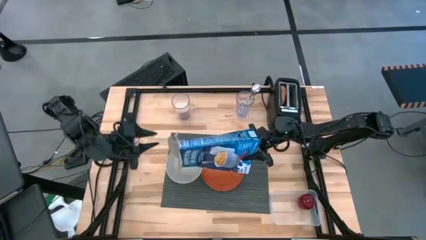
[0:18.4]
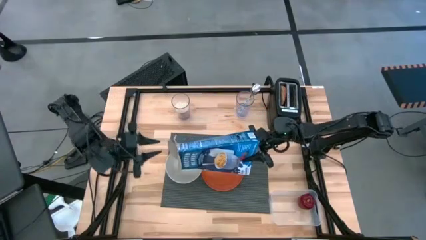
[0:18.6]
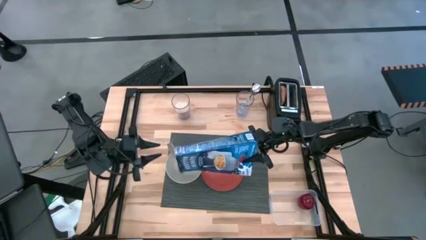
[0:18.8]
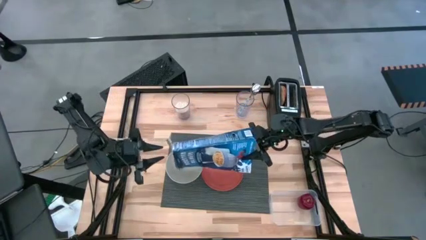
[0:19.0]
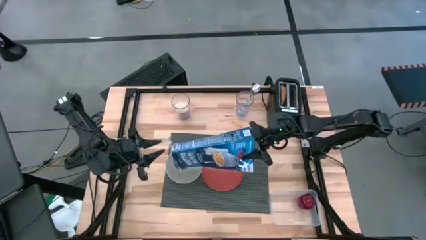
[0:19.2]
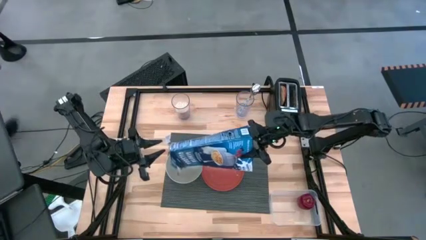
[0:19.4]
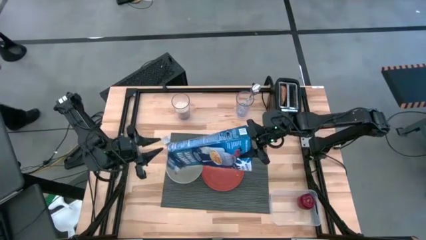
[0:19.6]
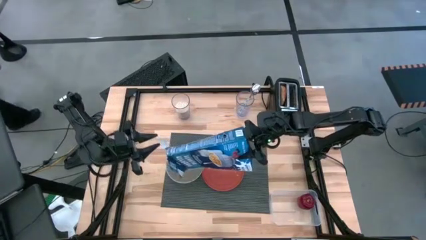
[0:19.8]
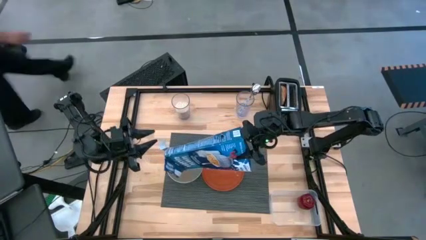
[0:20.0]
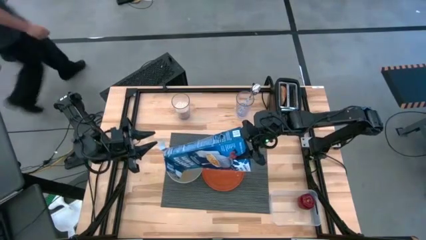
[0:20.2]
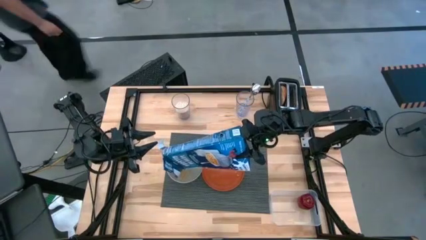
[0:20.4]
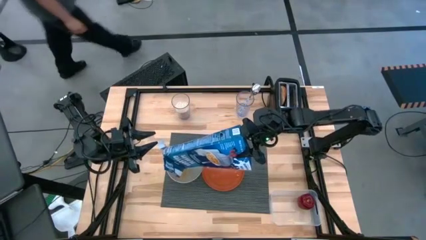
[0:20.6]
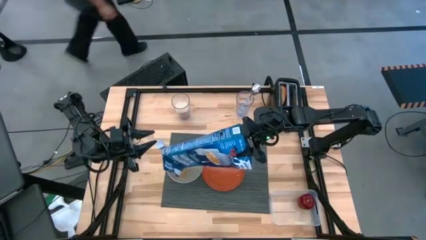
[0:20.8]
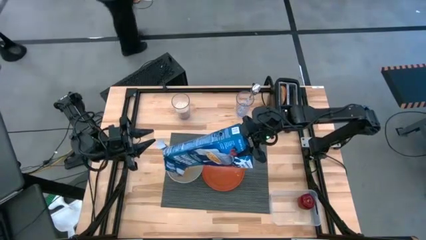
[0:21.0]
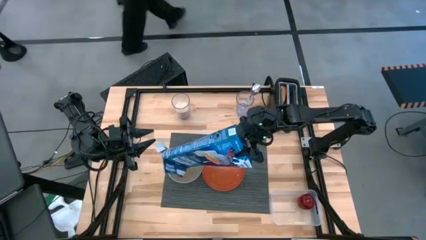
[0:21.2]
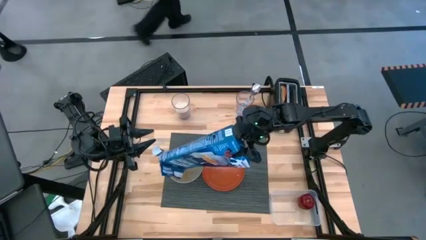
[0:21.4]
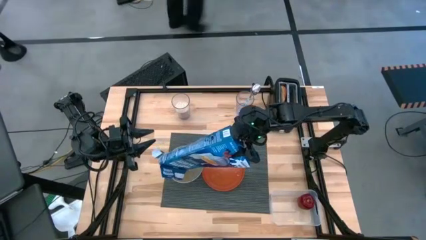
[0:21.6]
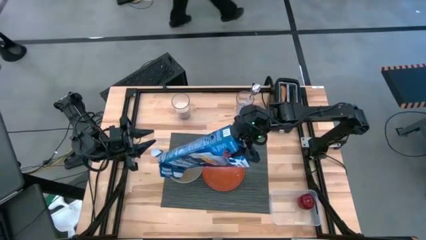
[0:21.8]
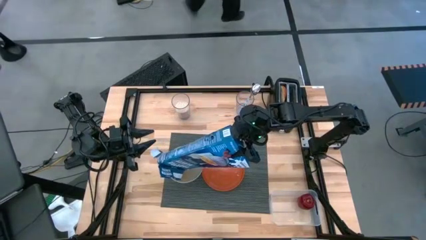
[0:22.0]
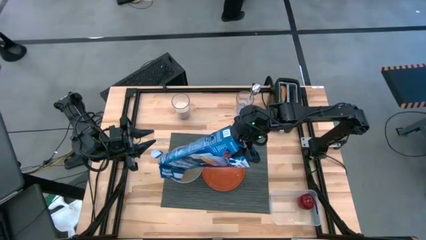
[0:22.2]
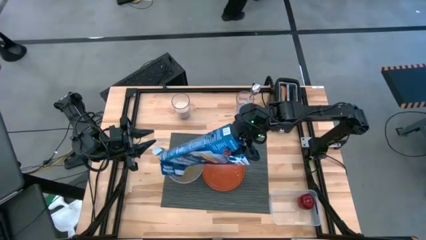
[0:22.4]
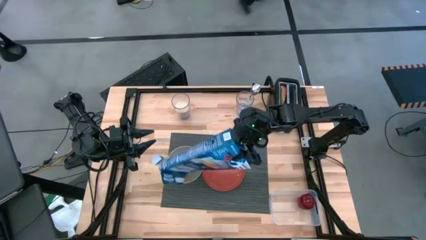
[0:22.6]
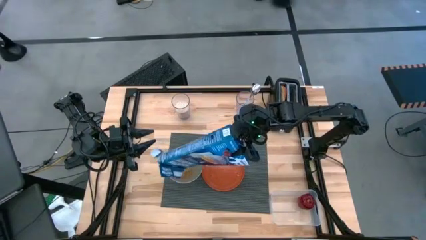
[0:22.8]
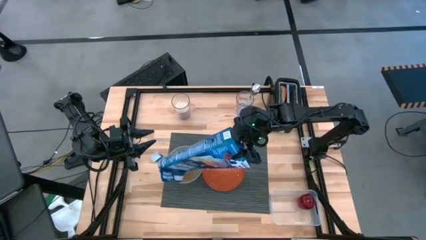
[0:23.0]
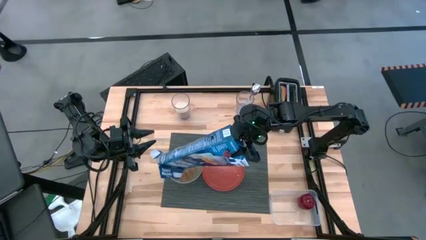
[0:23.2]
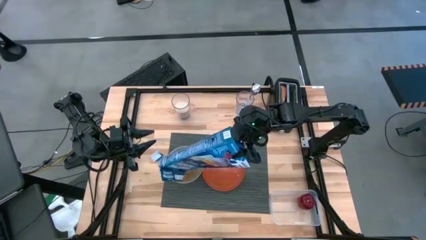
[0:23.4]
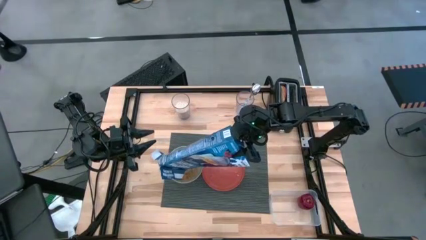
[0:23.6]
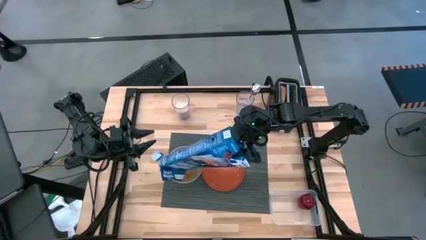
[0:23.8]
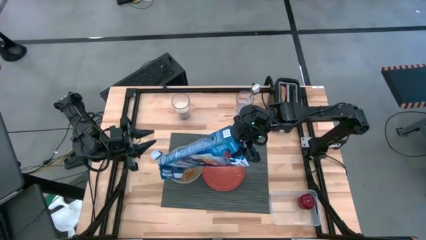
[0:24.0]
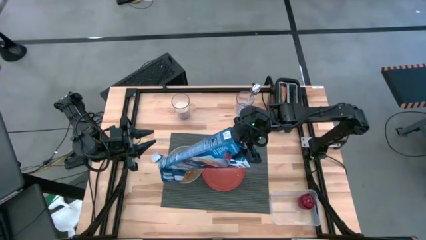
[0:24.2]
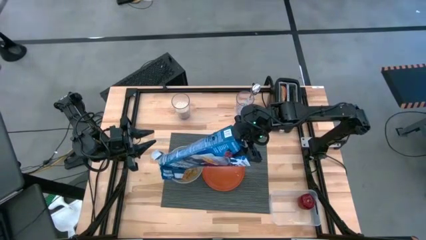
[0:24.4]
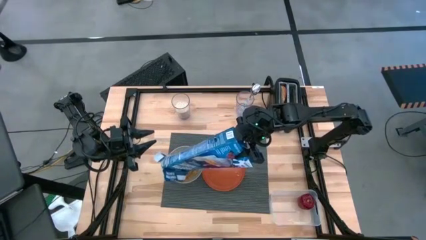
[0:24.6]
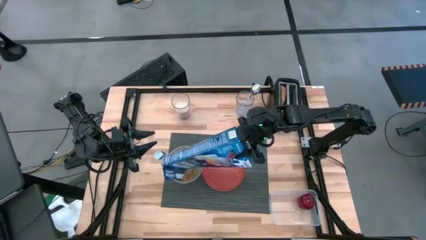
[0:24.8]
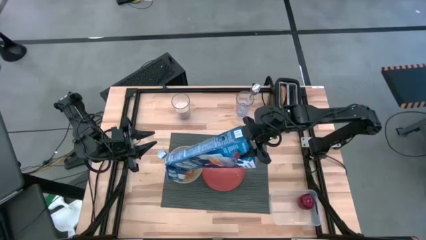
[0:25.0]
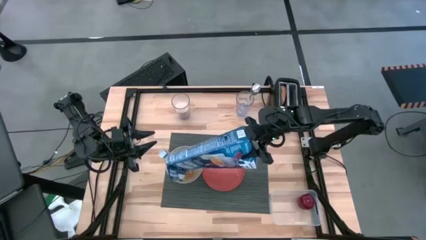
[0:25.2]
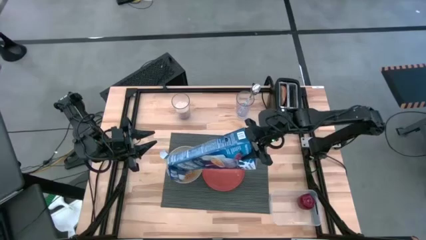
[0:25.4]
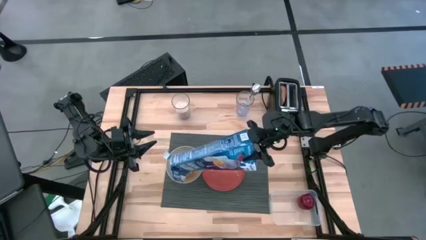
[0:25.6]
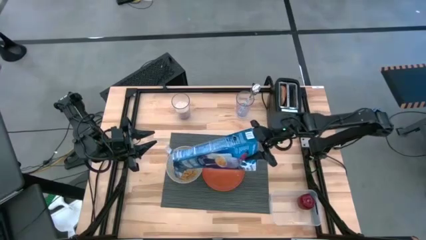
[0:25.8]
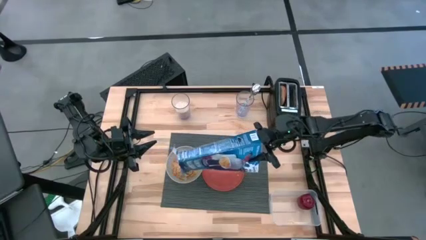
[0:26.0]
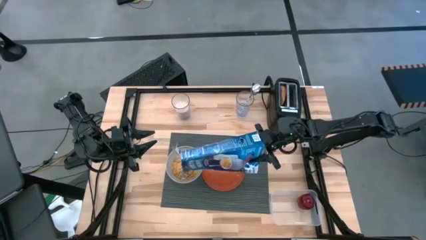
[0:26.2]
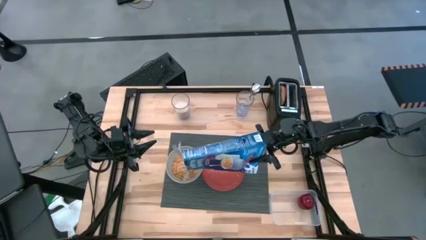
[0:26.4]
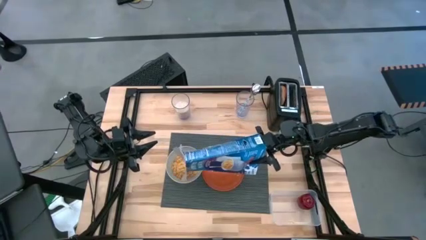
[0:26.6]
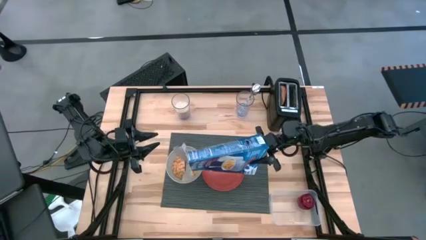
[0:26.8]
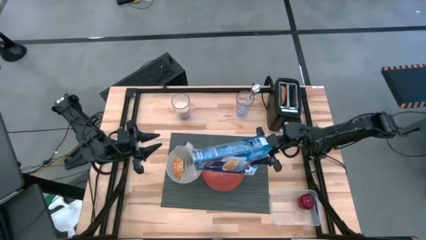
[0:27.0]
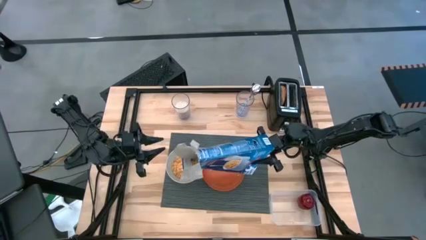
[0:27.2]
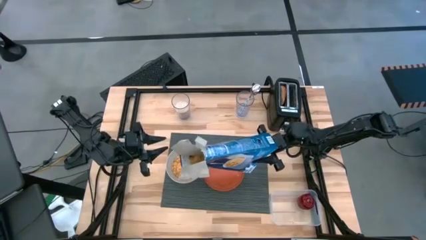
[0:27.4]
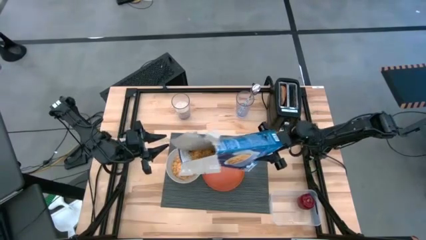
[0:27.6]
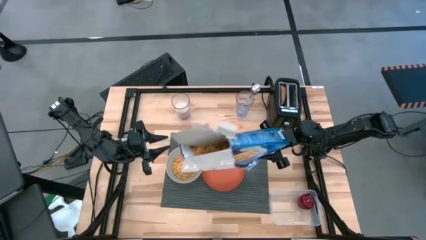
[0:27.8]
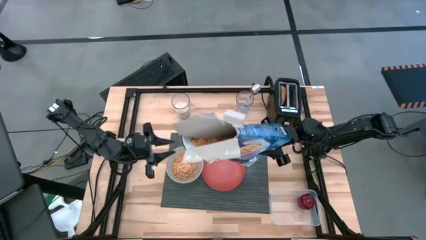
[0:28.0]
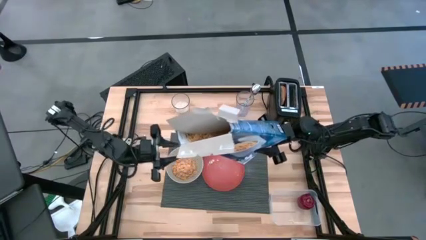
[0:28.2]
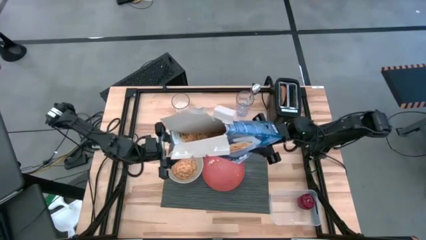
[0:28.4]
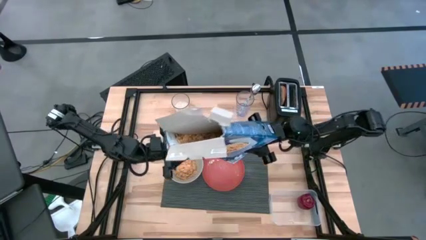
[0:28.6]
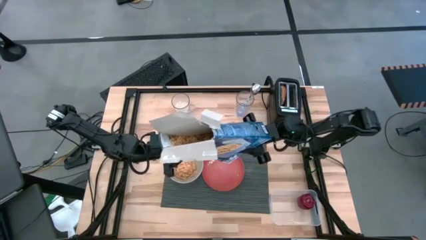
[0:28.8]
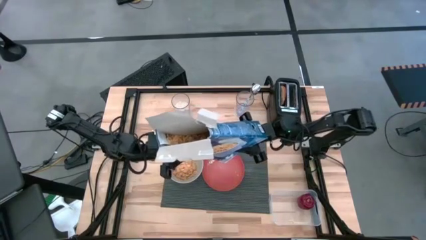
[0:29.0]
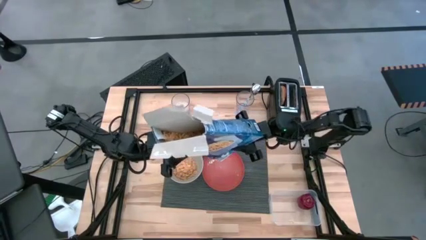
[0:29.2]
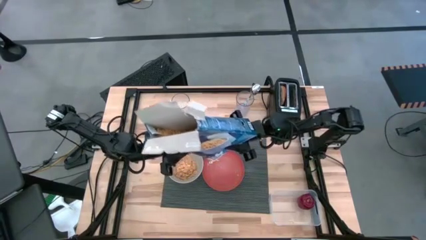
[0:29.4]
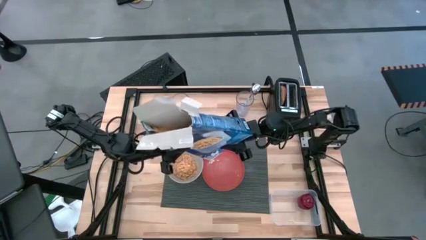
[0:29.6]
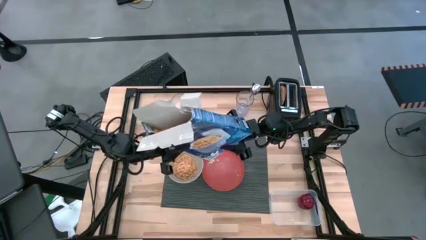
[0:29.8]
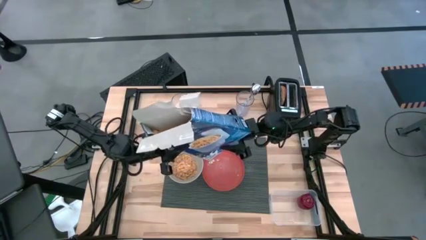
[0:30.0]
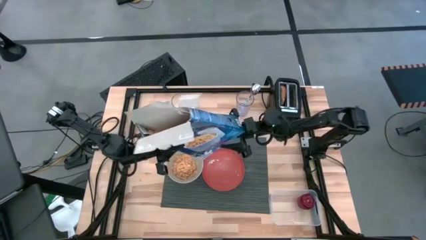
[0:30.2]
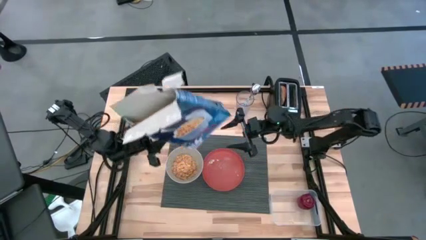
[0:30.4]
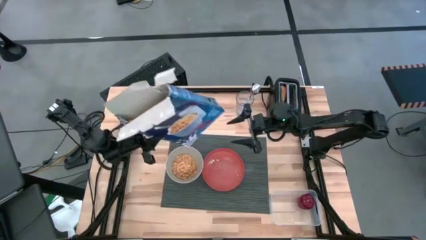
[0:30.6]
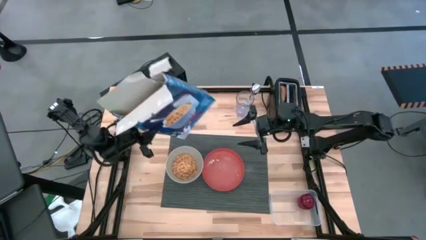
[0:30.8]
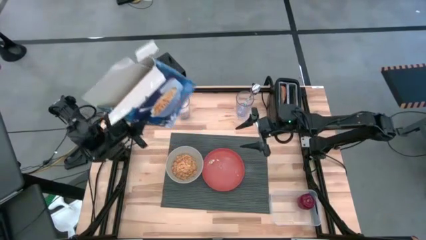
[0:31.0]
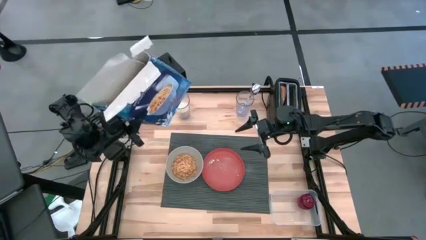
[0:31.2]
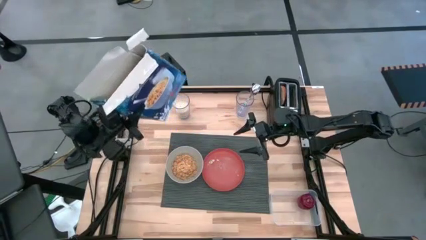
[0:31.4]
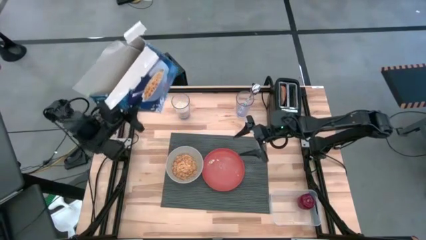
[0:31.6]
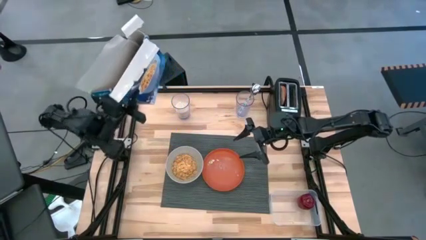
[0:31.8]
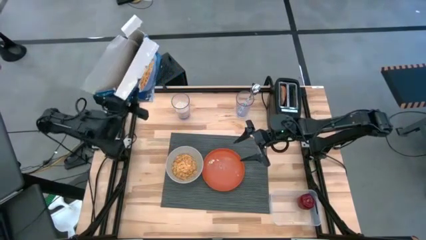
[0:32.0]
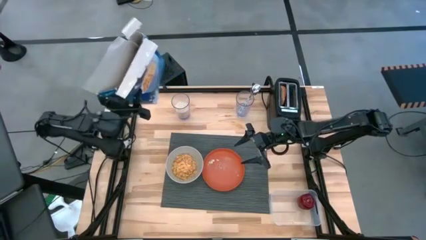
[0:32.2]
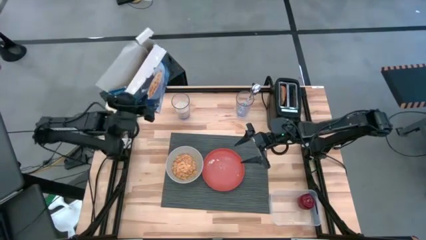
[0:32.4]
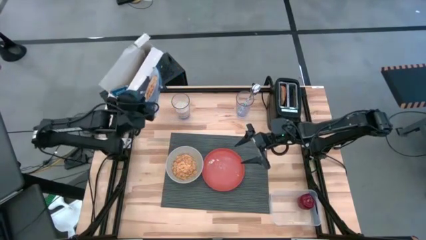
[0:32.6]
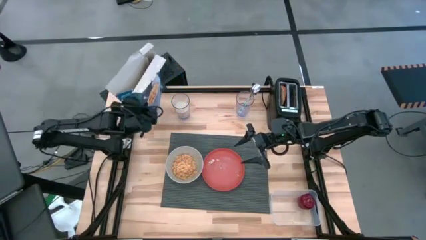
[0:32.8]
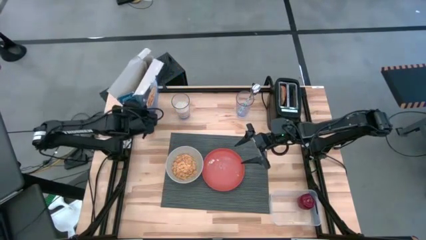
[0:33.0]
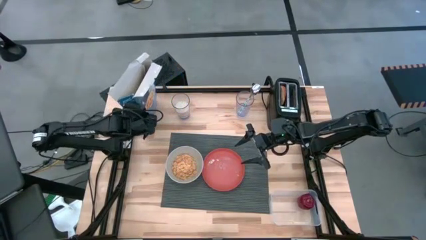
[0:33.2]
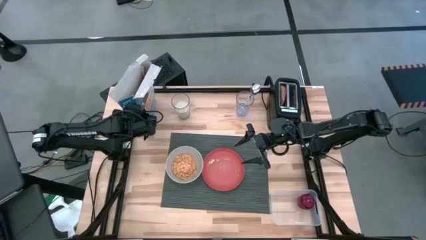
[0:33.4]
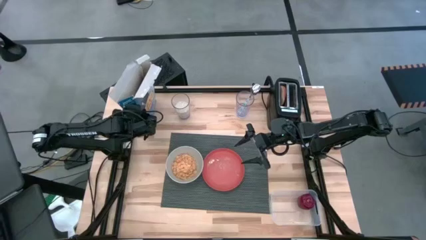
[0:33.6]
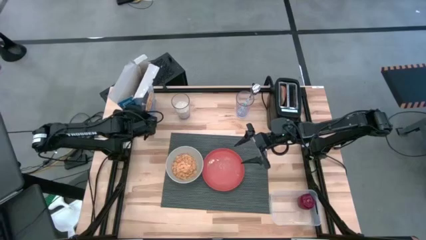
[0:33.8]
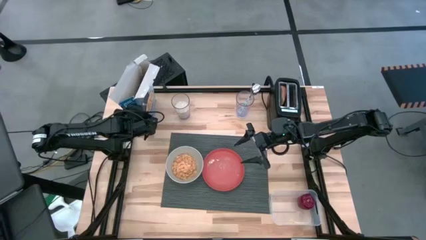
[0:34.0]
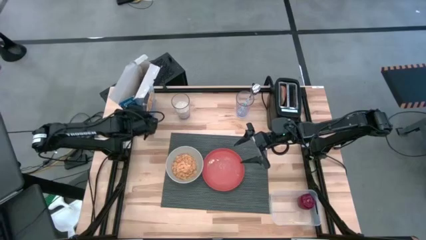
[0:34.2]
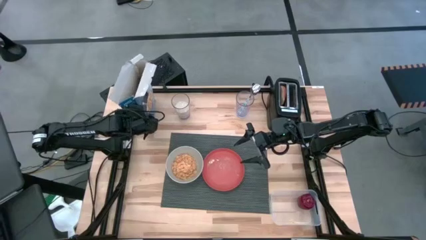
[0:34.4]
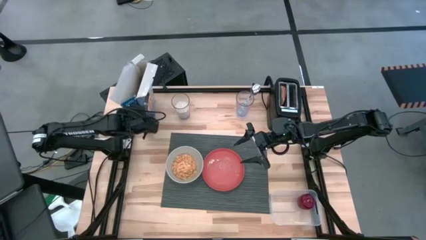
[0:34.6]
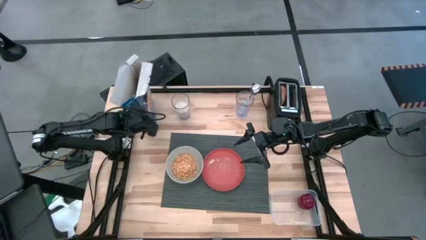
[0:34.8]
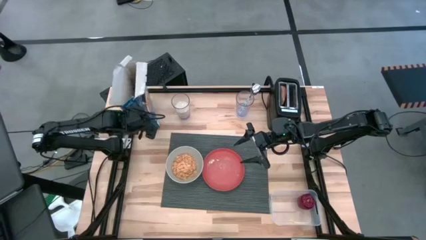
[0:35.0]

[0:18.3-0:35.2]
Task: Arrange a breakfast setting
Pour the cereal from the cereal box into the bowl
